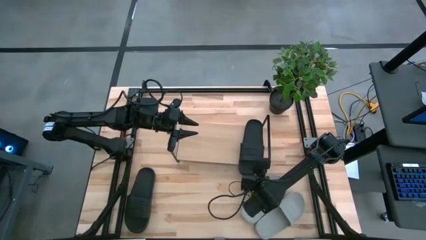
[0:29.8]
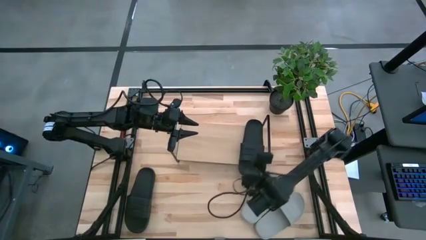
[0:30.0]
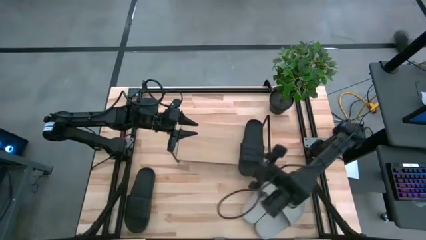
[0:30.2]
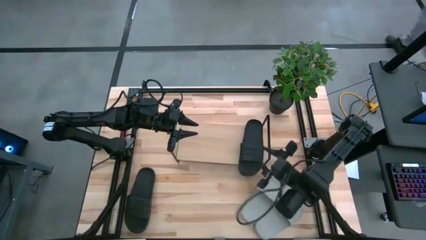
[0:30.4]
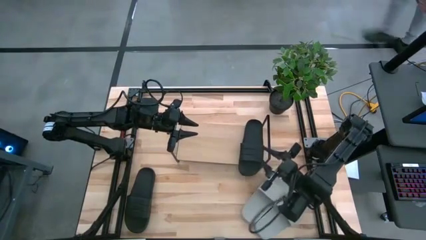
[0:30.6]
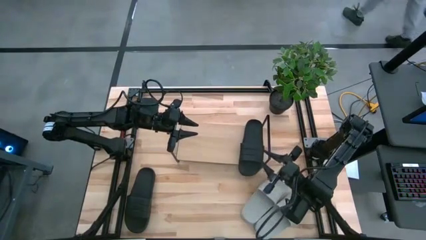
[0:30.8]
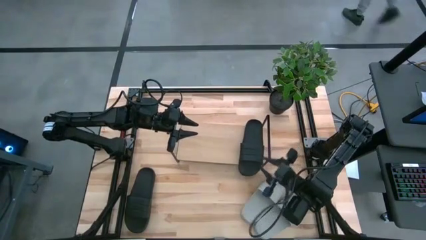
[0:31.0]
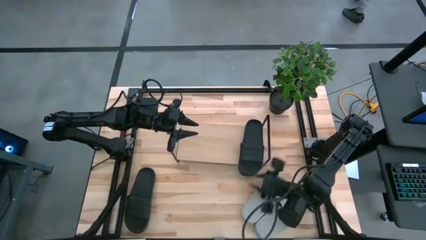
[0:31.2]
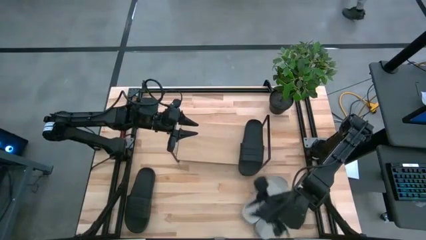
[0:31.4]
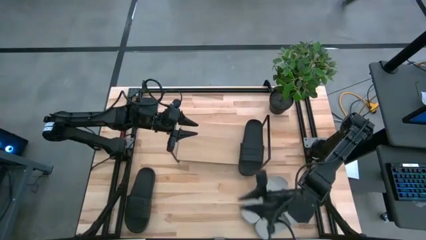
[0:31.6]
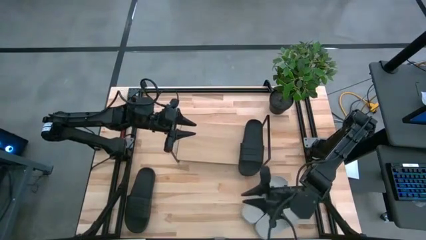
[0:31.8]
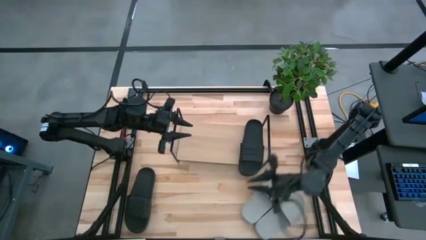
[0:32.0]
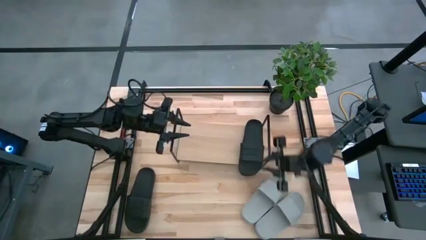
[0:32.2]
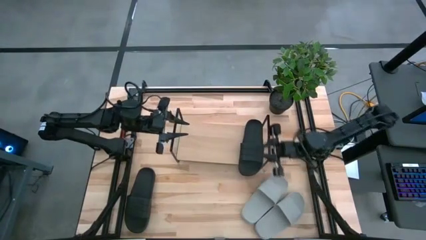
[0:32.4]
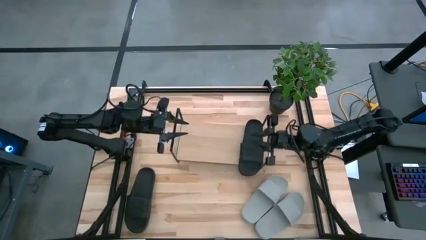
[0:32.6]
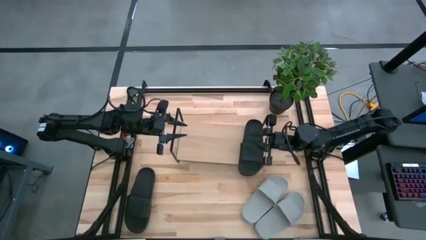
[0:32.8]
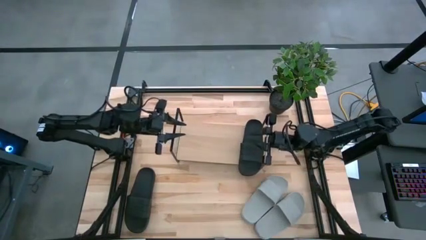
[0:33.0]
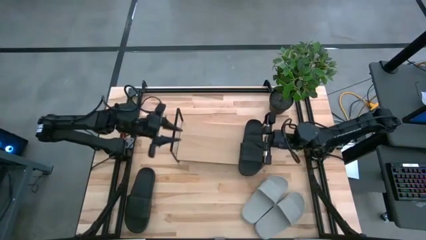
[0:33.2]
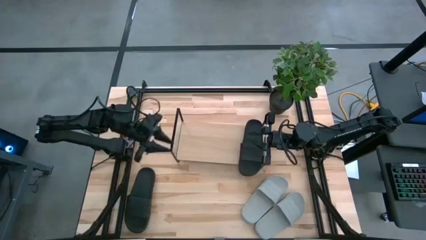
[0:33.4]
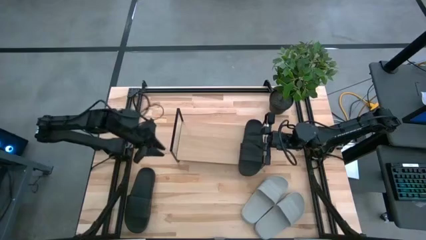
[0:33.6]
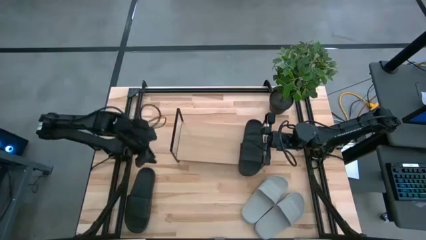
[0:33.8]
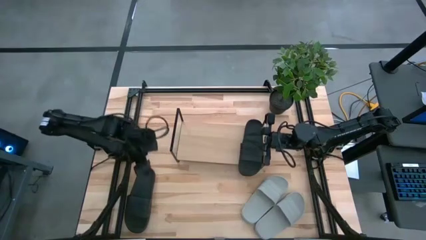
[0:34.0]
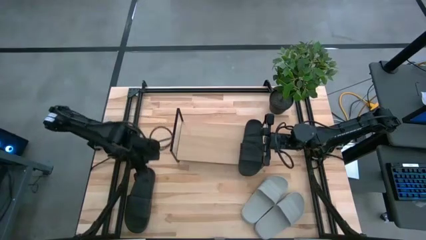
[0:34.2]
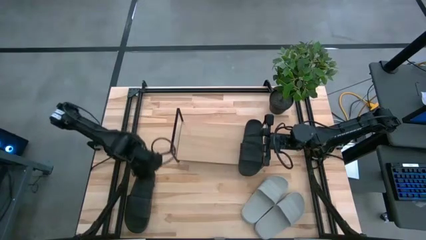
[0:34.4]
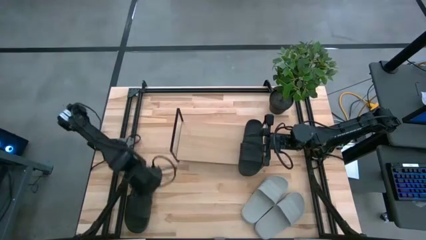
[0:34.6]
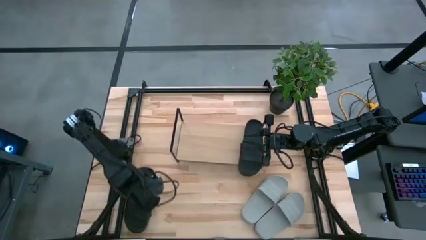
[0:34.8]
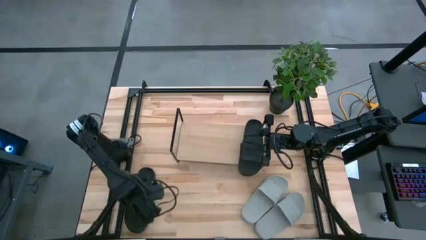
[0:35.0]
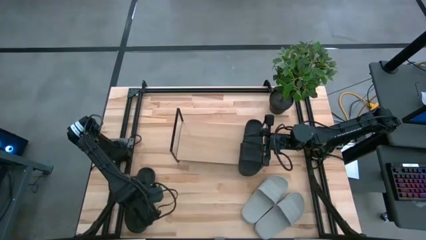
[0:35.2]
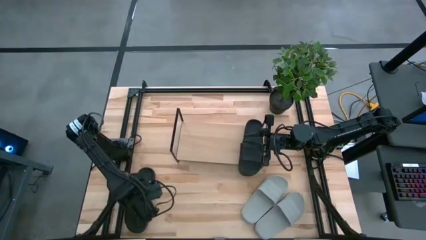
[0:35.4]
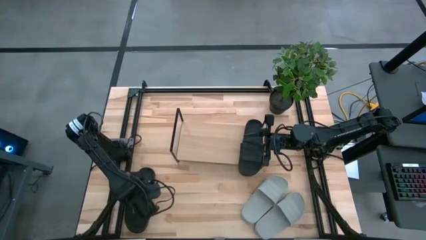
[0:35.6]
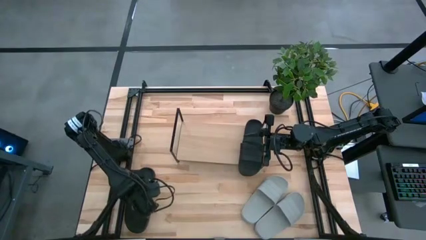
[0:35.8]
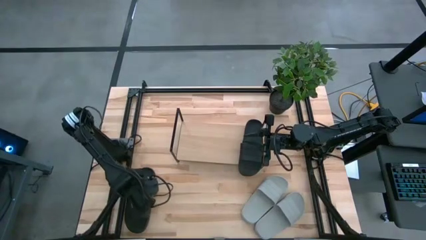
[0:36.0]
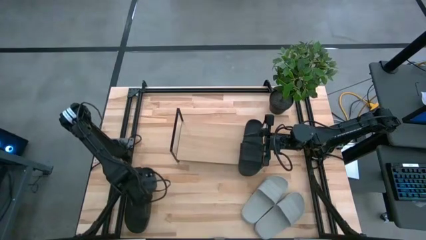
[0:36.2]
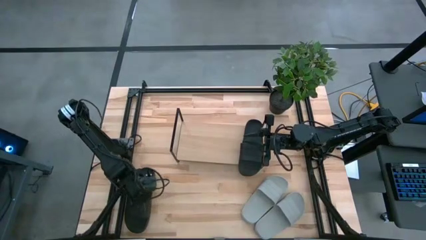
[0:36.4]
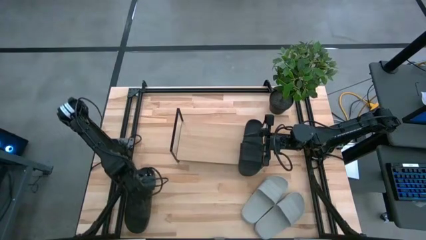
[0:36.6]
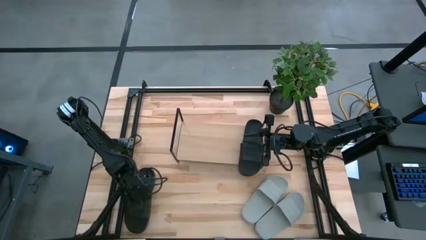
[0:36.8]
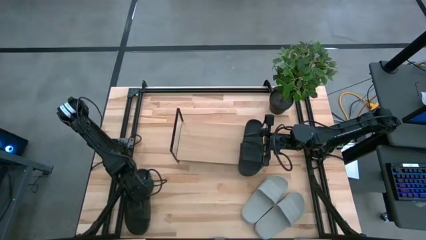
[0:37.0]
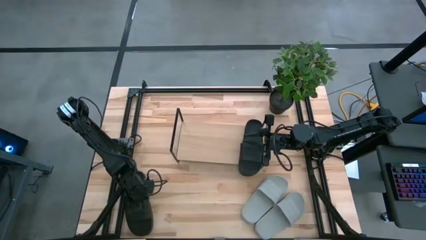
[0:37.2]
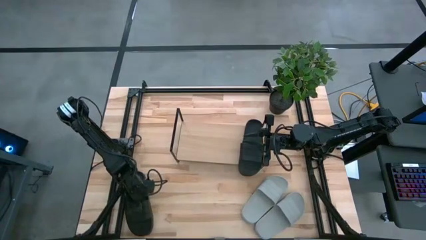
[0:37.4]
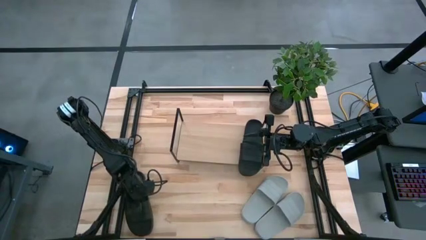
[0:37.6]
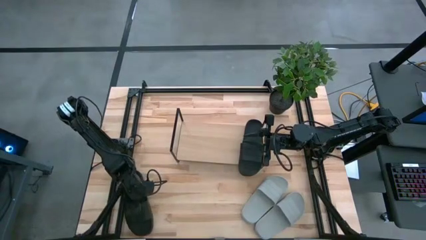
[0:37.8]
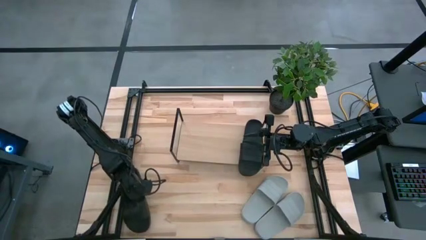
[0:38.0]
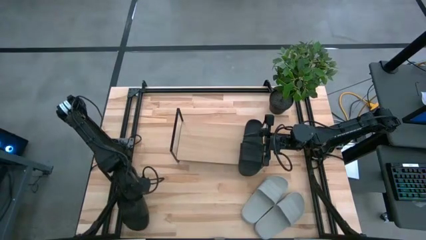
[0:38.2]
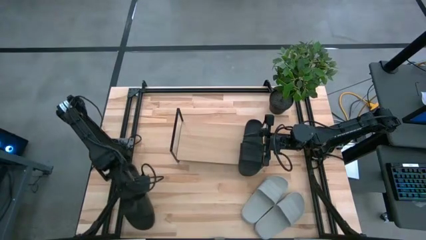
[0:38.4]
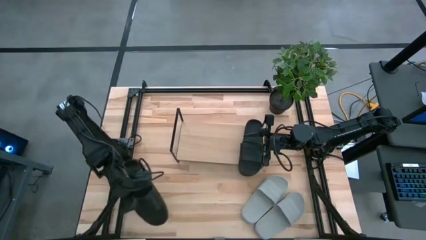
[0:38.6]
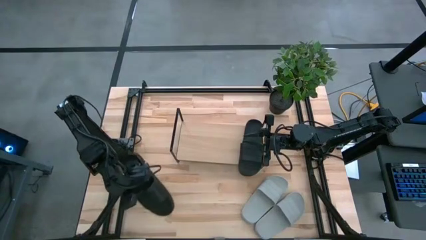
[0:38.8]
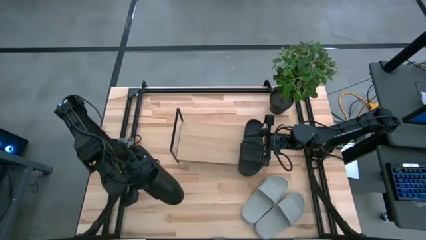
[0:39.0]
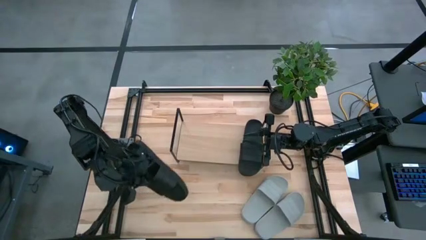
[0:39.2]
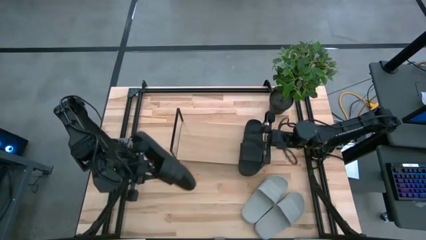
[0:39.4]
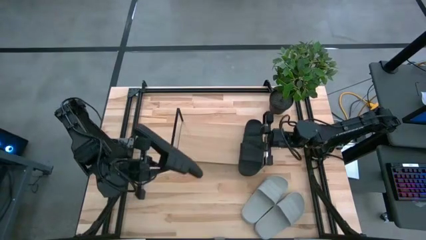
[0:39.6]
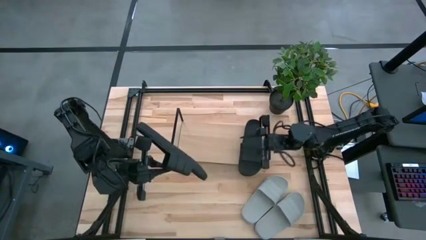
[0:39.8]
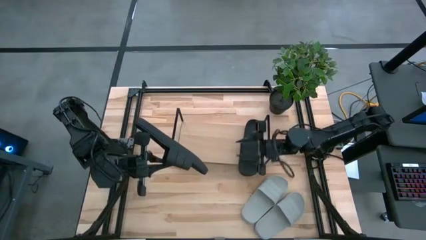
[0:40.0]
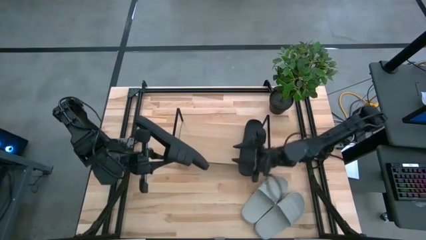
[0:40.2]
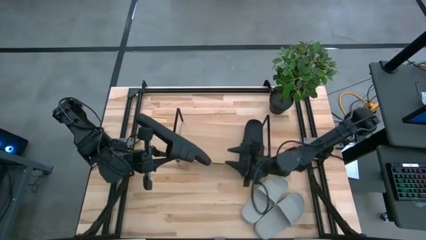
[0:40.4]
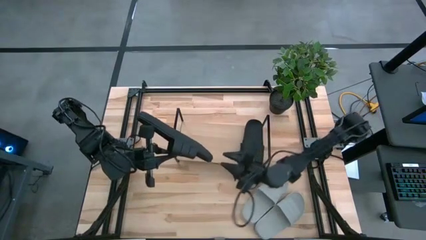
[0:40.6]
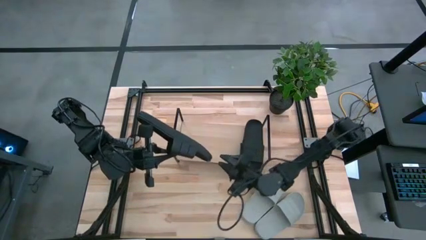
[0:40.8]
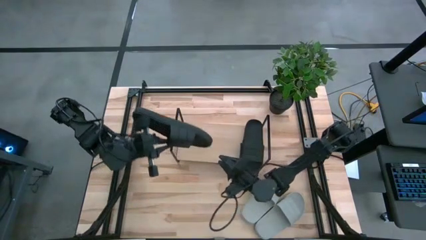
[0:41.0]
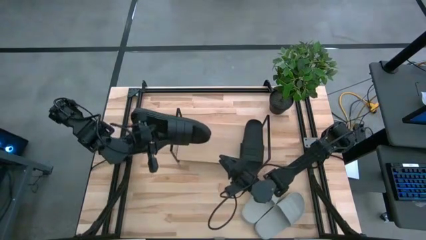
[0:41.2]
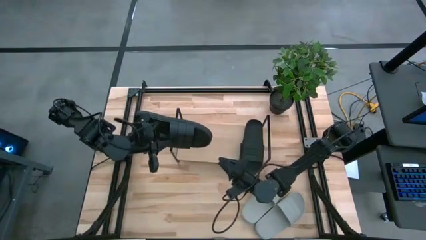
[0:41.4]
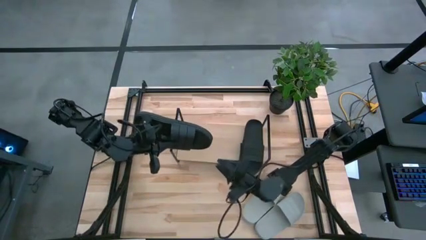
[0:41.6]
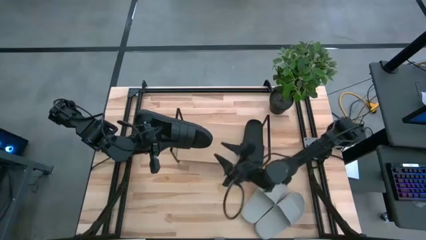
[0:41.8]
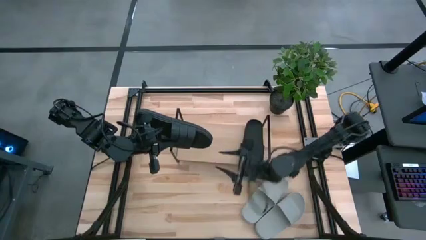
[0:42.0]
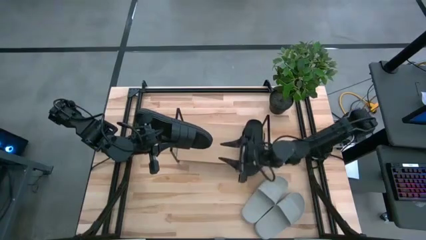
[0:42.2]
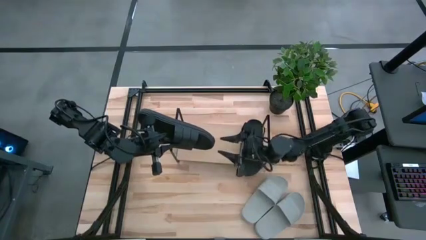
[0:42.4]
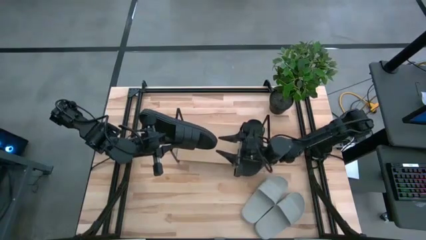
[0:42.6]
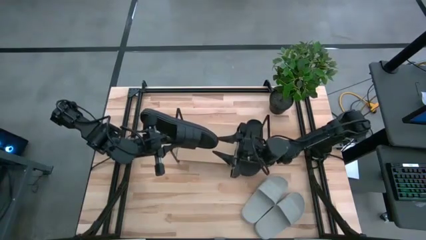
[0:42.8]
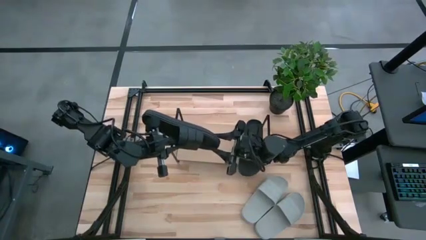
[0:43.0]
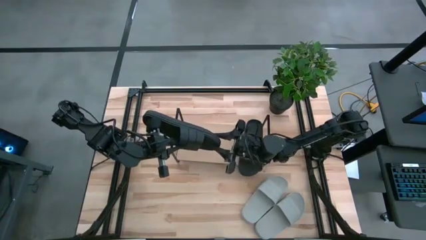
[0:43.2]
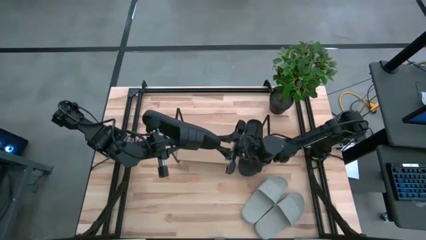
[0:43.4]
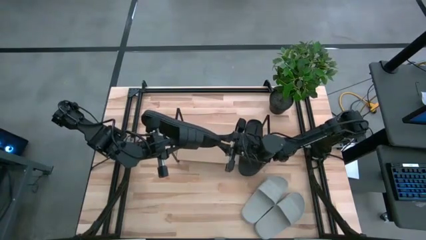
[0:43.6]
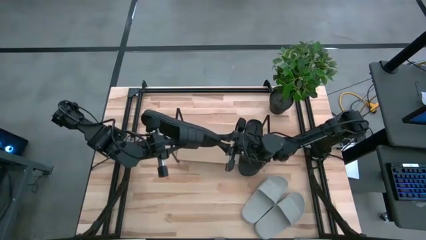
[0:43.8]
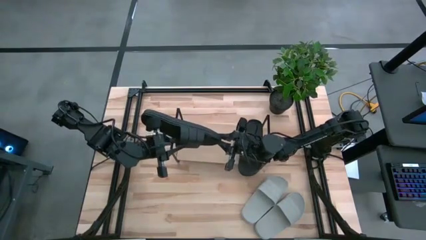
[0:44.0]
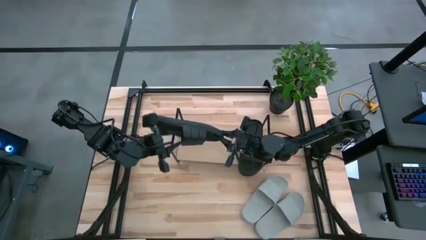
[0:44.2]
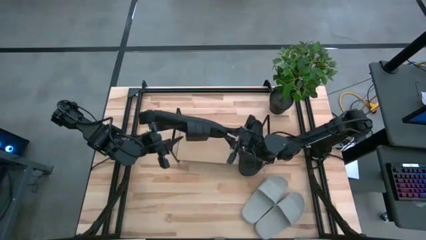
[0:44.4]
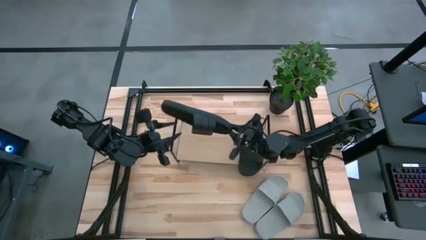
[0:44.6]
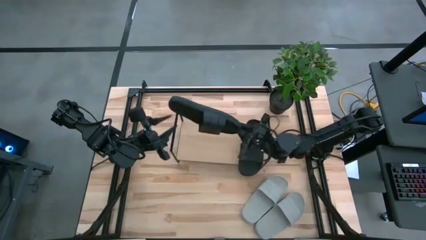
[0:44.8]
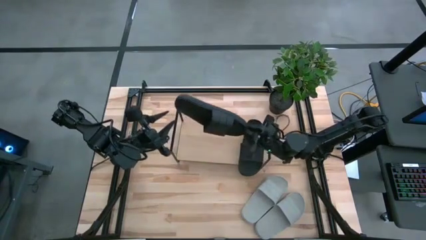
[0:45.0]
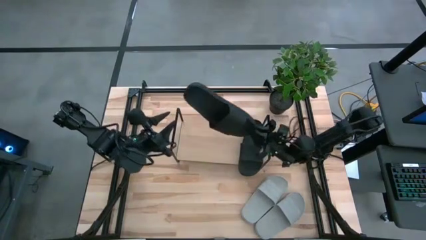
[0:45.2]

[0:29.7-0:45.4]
Task: Pick and place slides into the shelf
Put the black slides on the shelf
